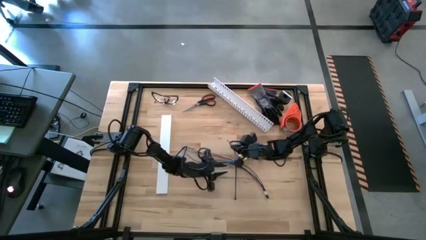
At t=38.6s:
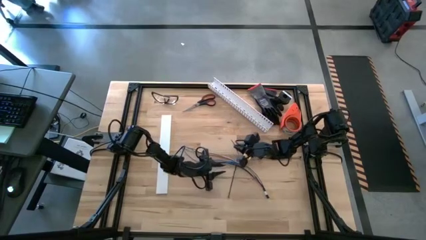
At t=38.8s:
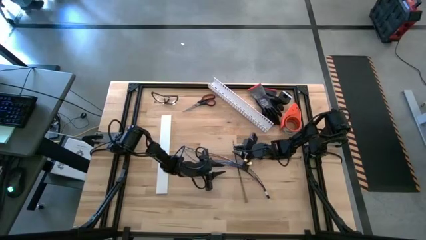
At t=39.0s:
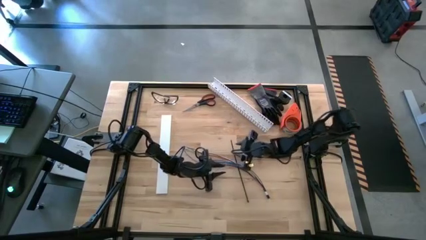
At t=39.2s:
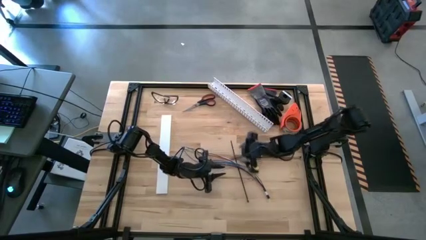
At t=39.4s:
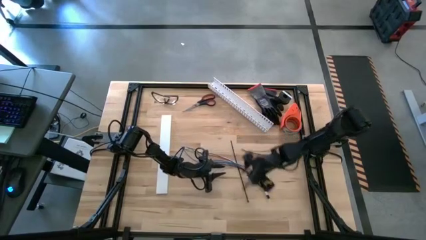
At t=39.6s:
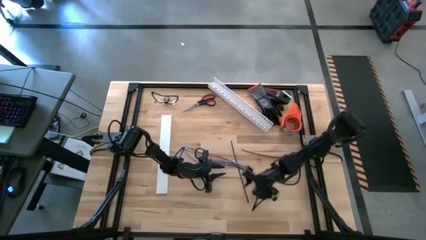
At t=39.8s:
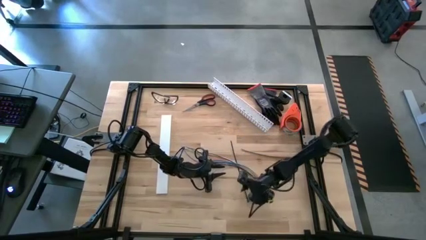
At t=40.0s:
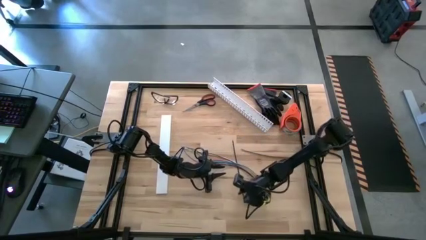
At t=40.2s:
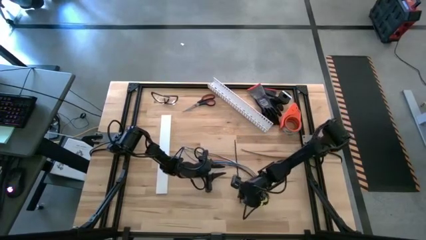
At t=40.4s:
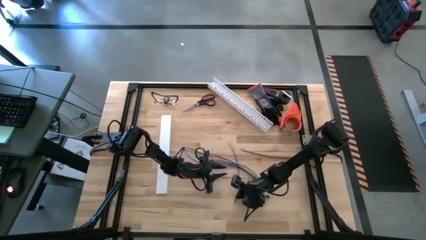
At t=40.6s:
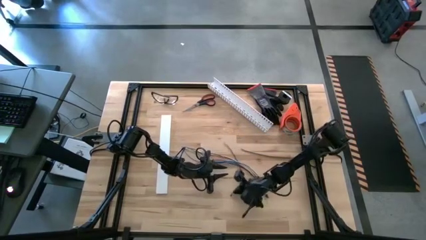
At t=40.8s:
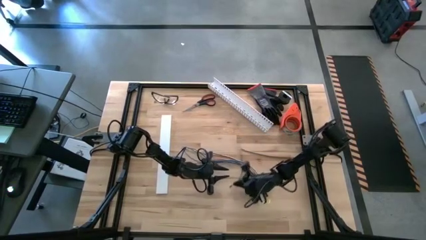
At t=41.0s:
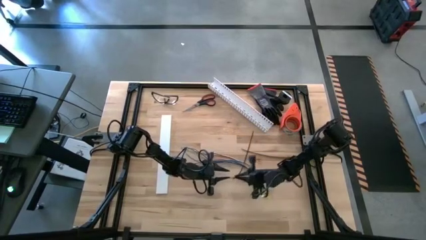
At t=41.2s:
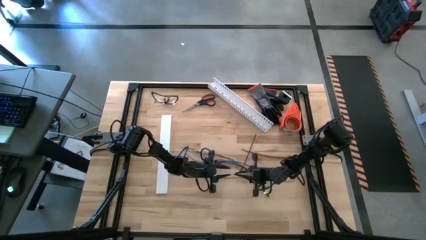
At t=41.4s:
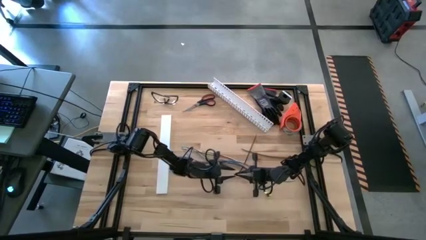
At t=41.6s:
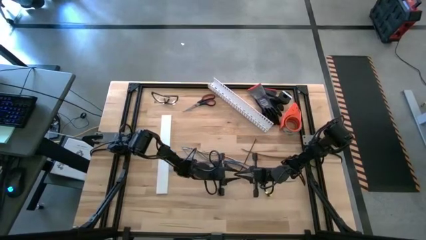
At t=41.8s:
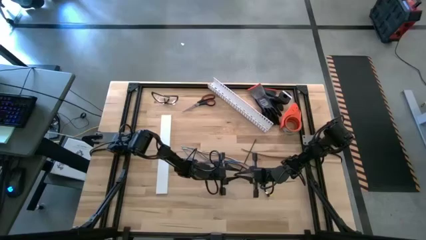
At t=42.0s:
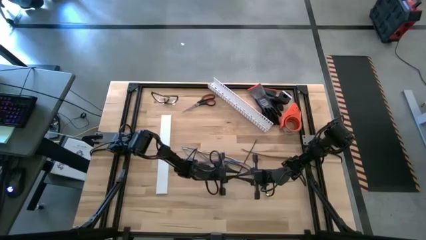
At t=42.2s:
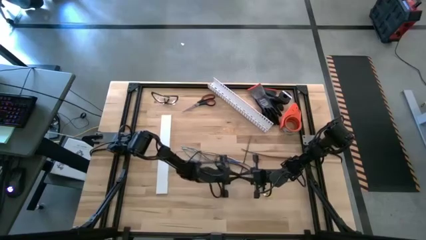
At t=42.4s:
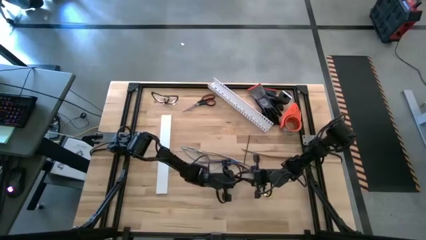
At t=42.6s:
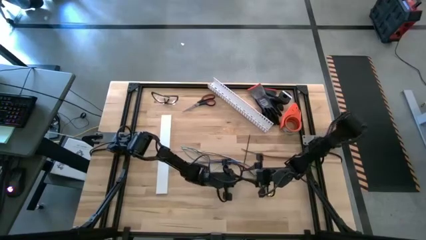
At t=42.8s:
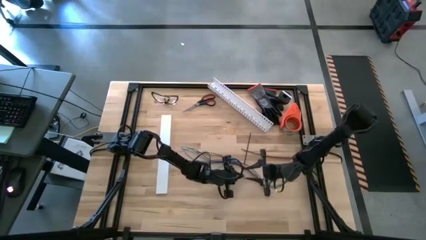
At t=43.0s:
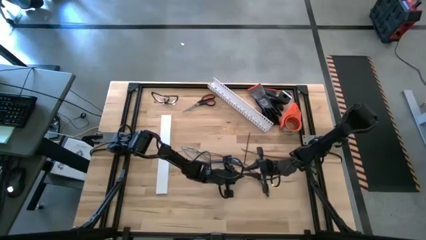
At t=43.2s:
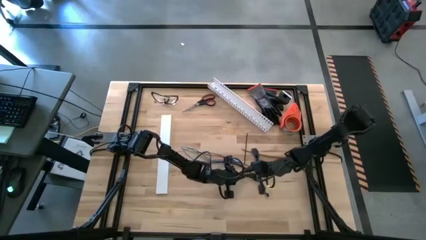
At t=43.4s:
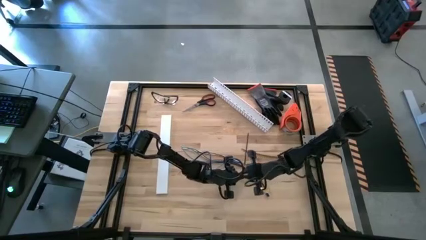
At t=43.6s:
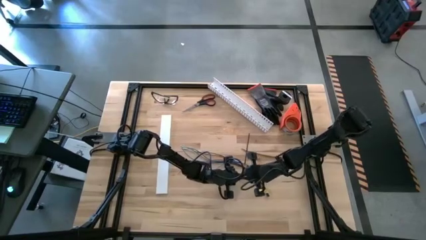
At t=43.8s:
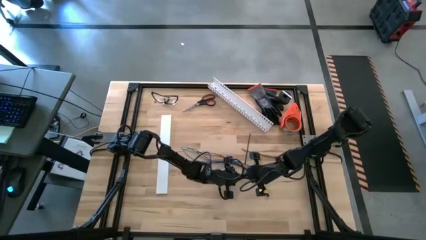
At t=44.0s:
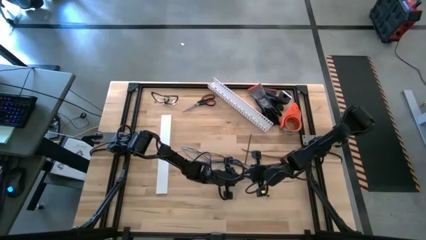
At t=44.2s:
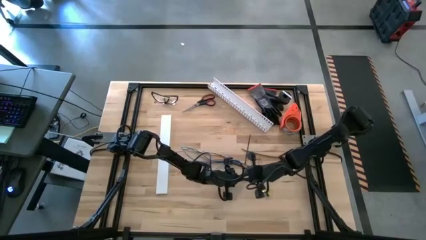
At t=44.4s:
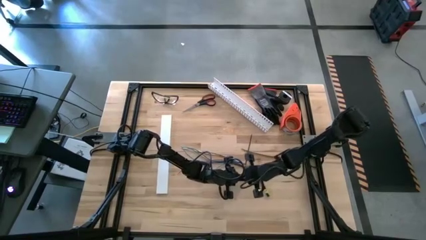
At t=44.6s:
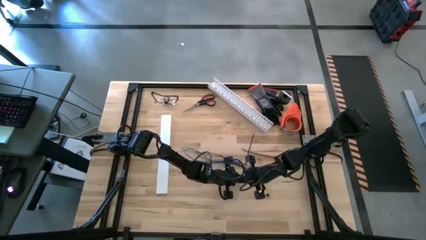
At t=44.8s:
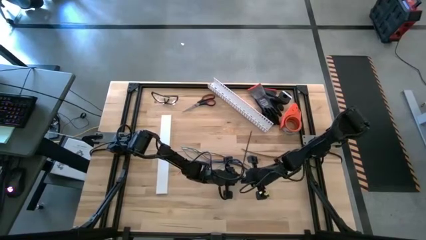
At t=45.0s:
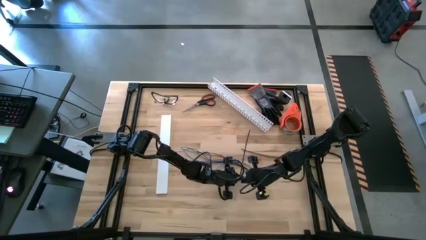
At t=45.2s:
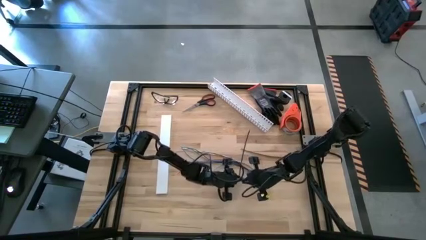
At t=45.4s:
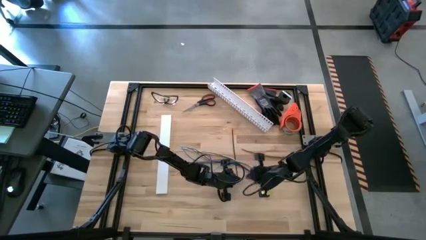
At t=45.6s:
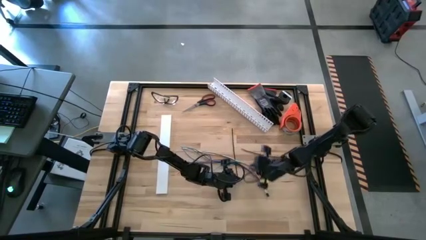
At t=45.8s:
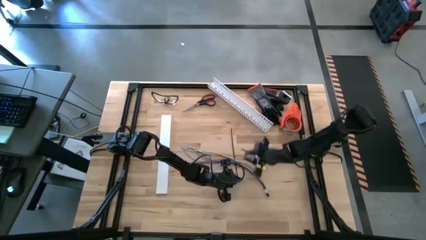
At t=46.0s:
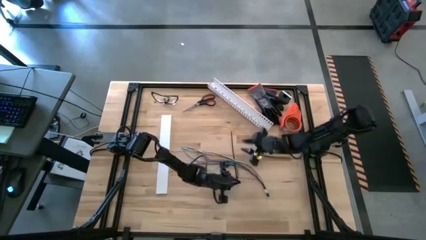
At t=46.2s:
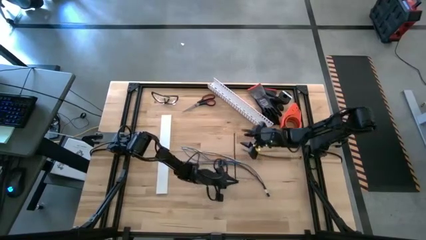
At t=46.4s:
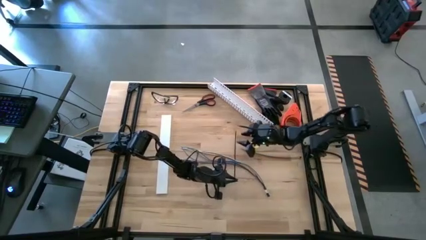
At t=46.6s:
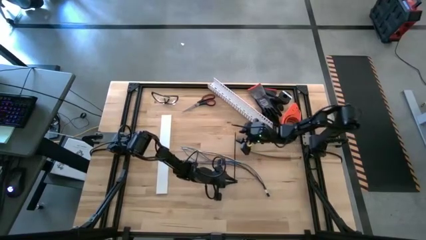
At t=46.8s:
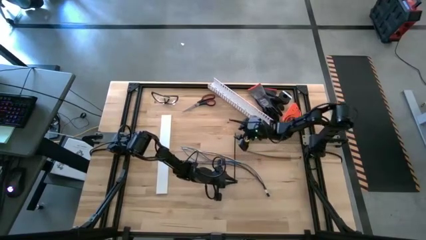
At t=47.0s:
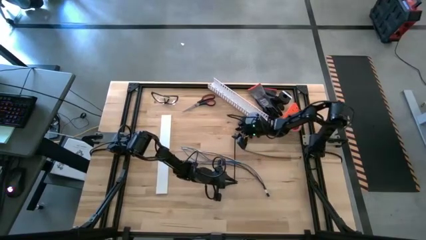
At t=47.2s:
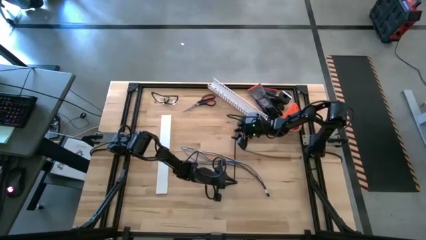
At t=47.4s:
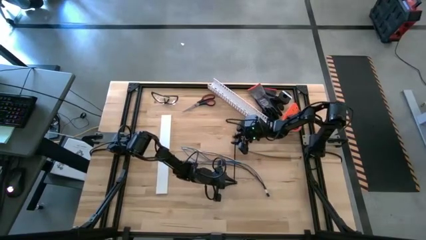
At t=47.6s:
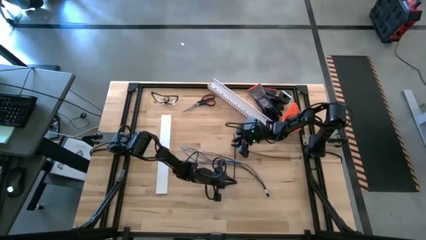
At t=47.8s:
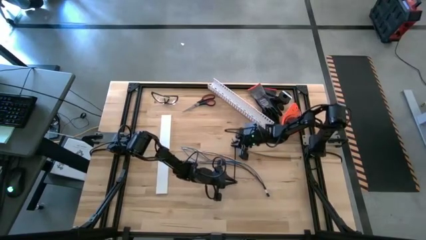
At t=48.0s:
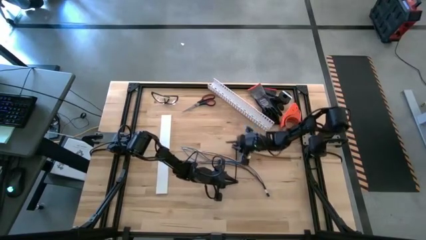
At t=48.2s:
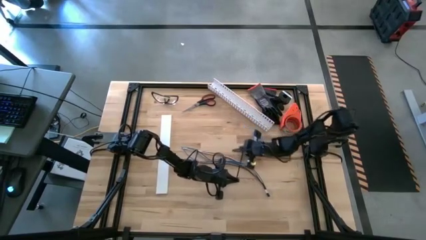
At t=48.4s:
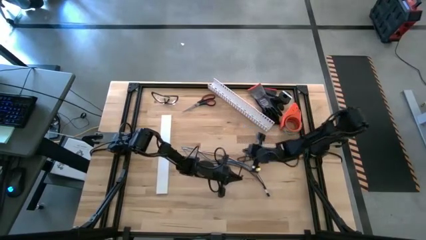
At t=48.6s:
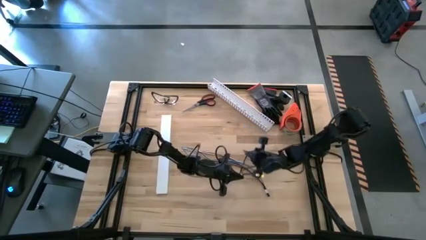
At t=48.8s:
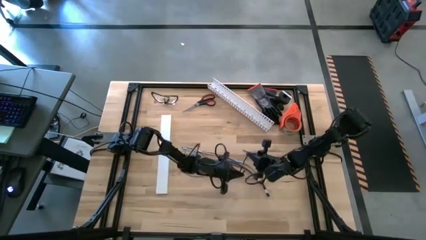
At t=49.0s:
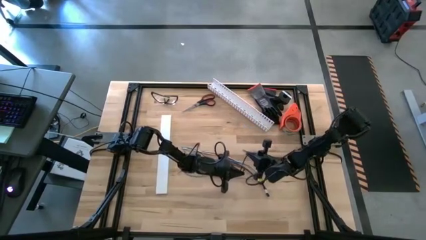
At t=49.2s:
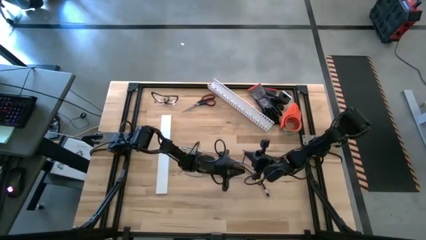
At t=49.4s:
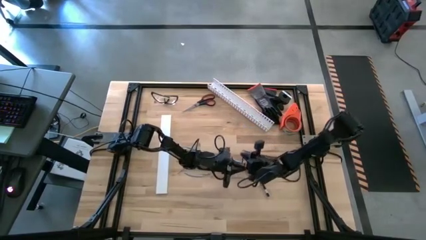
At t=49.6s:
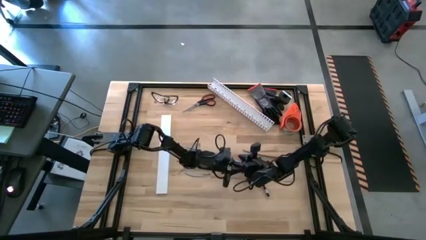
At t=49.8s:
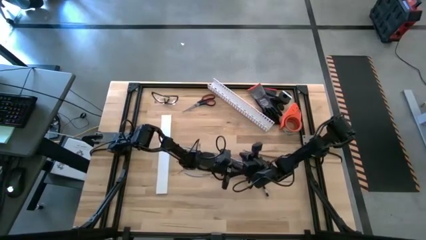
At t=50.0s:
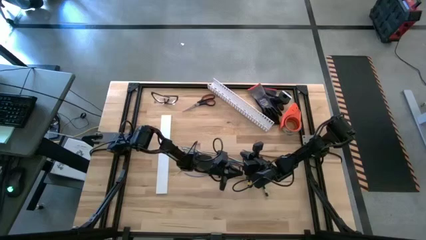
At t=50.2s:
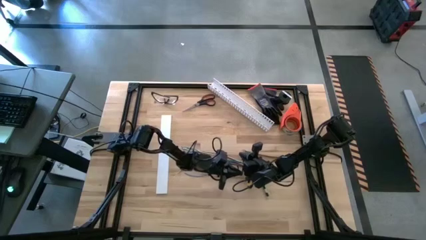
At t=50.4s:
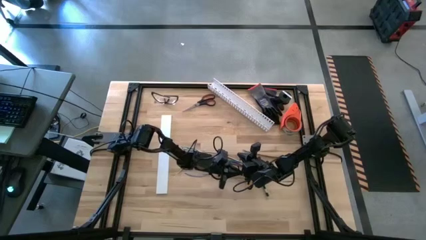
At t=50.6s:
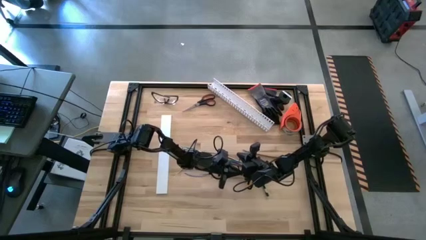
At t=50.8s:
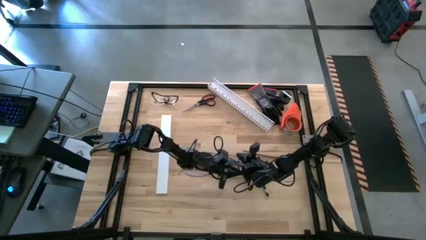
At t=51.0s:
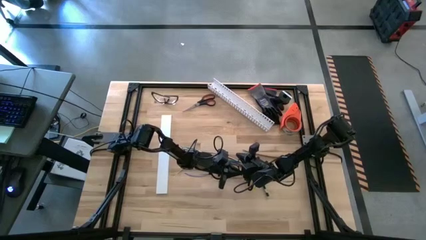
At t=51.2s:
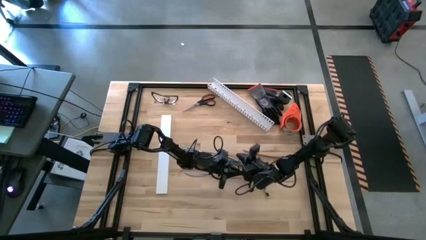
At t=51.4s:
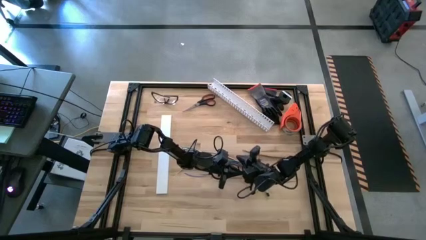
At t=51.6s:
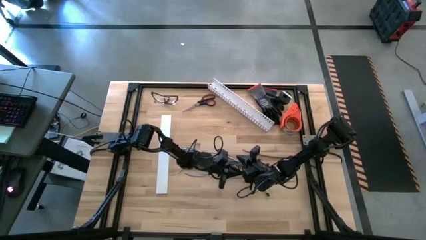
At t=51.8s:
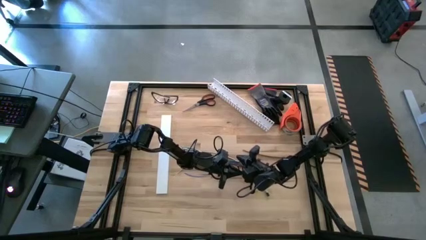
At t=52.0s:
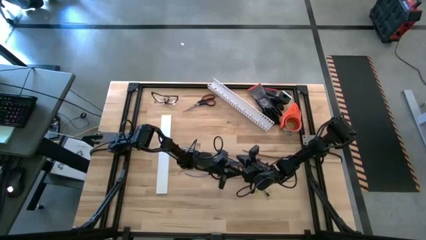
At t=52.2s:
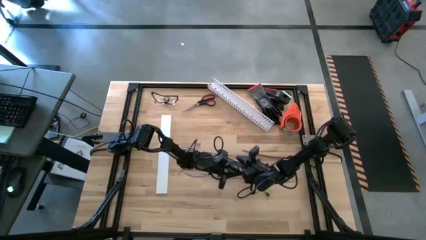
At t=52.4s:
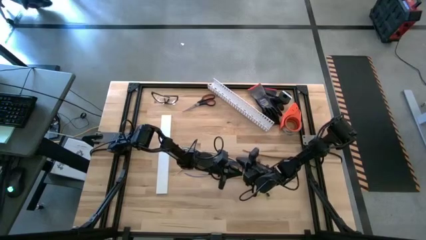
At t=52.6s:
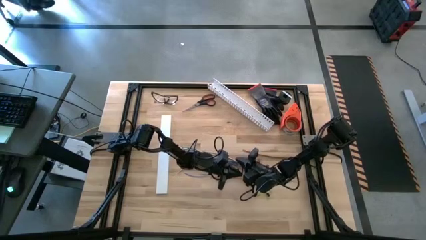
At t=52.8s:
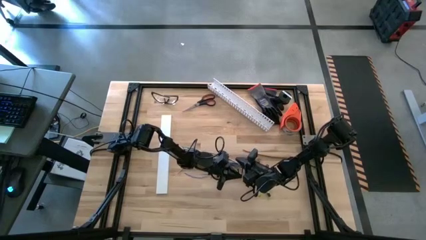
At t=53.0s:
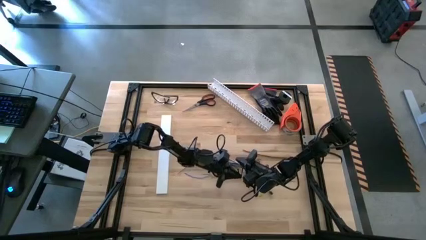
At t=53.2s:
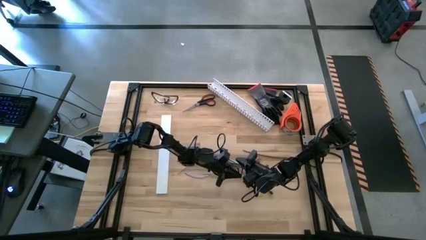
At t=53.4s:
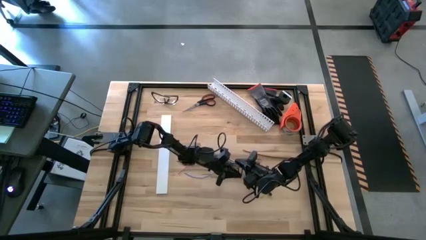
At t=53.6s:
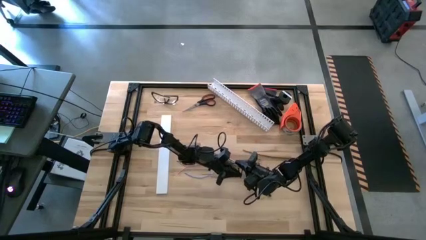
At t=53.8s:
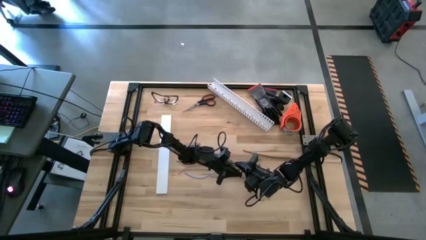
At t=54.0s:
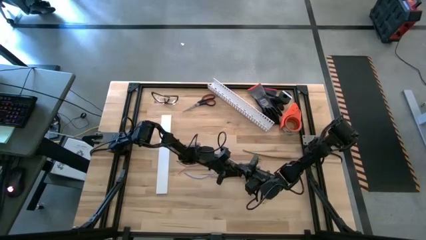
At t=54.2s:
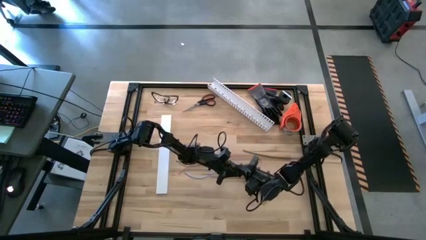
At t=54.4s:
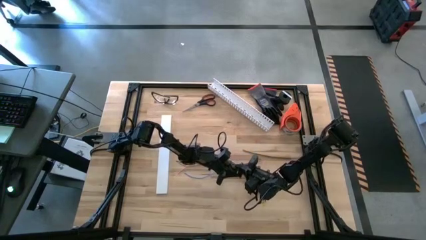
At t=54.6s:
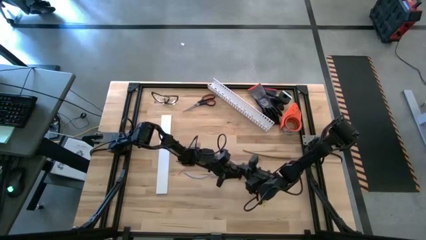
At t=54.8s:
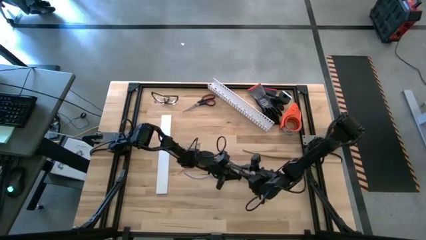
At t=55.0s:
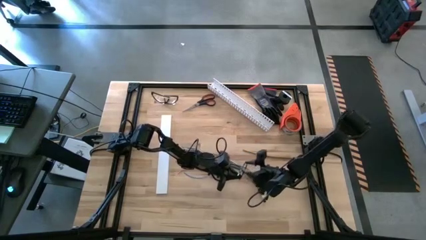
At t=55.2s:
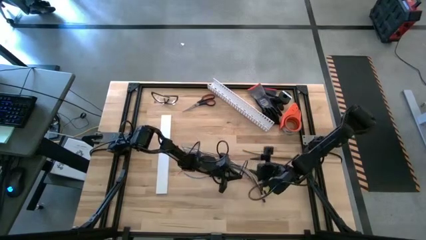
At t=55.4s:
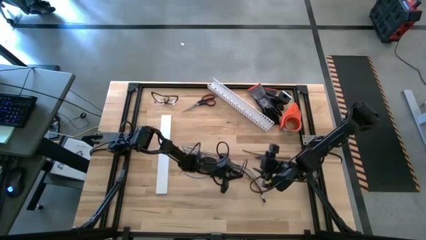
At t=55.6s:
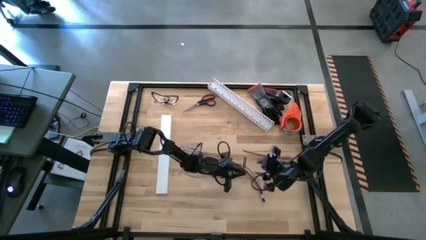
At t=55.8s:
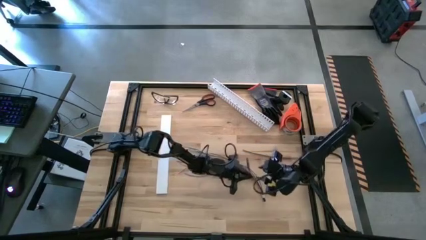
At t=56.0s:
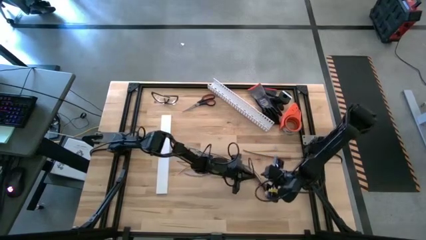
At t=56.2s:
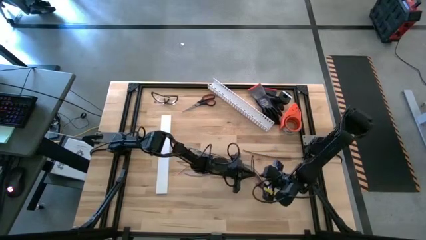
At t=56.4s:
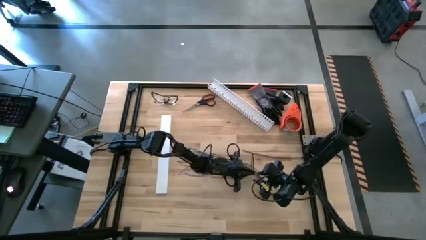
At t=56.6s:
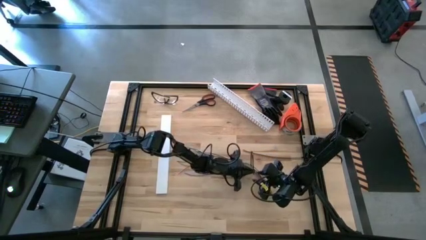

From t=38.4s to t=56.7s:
Task: Ziptie cables
Wrap the bottom black zip tie on the cable wires
